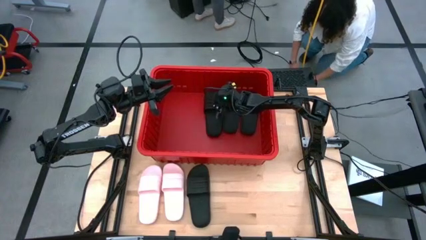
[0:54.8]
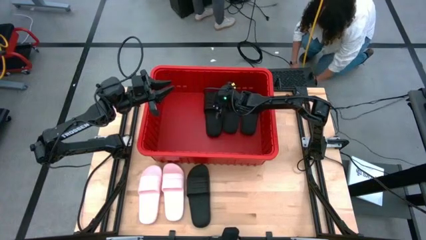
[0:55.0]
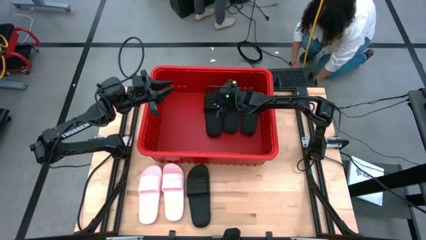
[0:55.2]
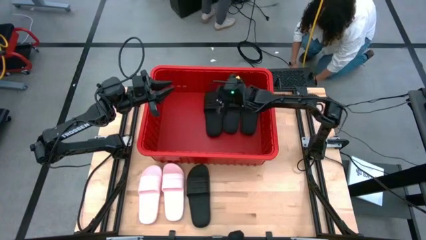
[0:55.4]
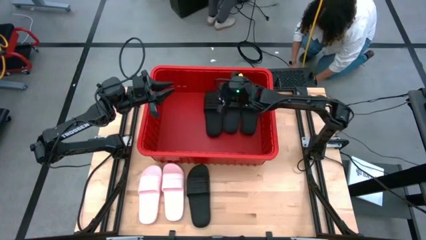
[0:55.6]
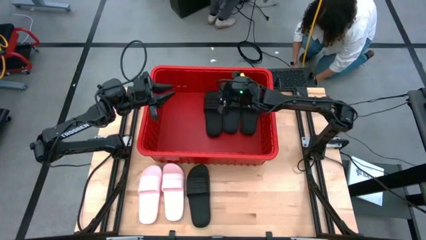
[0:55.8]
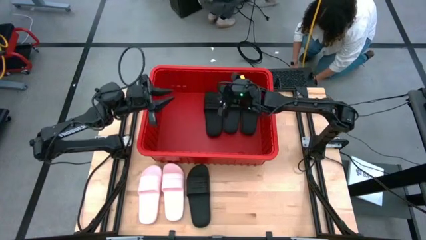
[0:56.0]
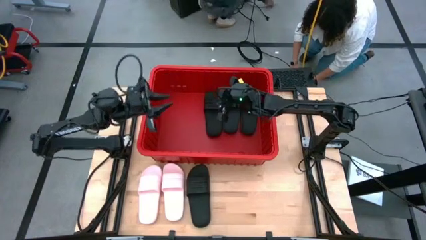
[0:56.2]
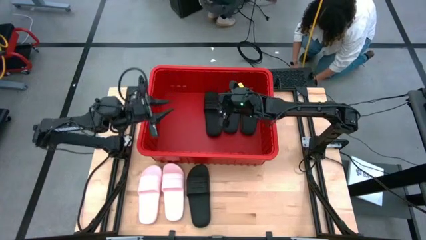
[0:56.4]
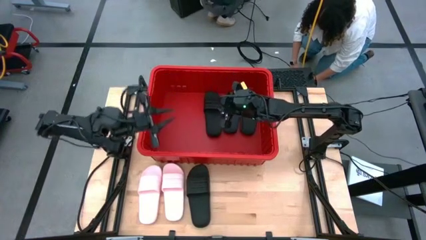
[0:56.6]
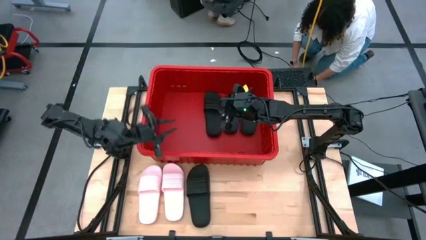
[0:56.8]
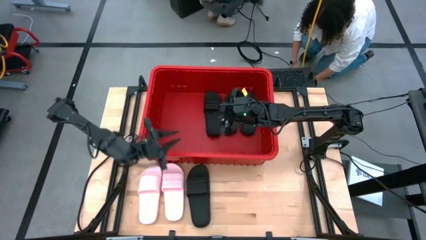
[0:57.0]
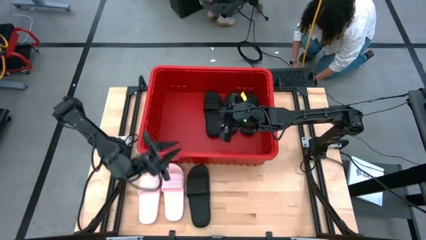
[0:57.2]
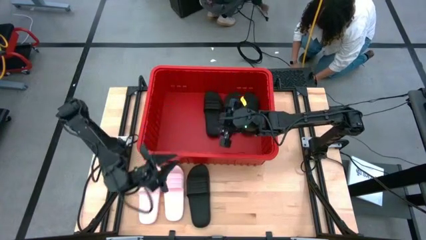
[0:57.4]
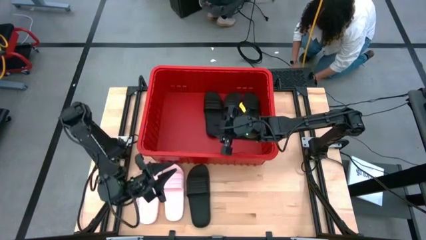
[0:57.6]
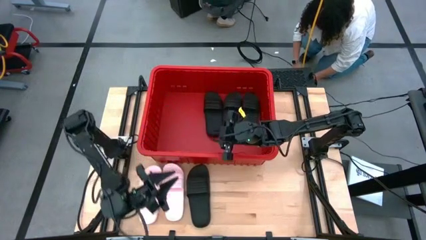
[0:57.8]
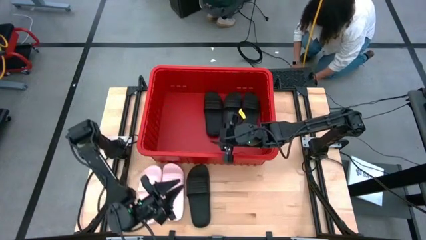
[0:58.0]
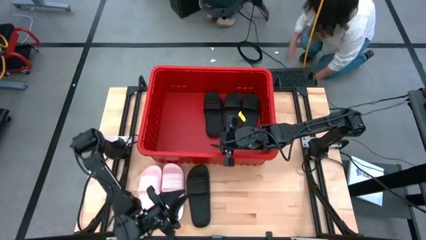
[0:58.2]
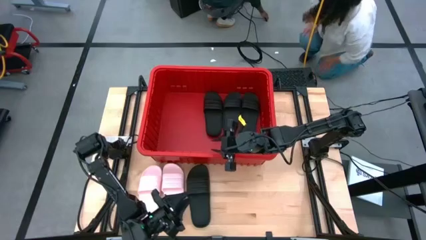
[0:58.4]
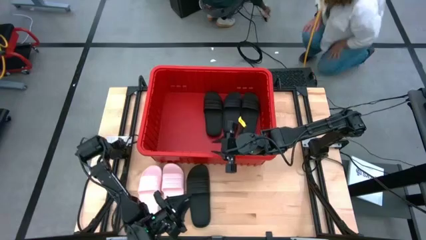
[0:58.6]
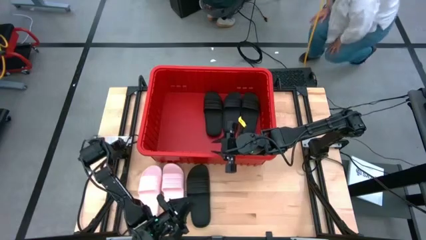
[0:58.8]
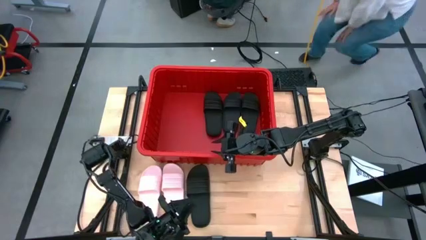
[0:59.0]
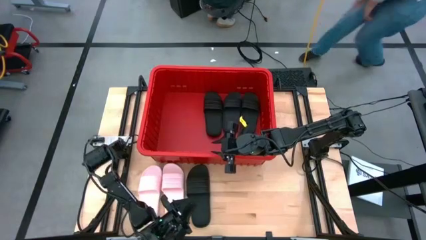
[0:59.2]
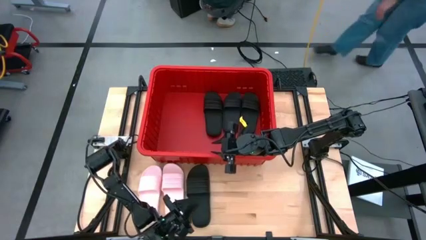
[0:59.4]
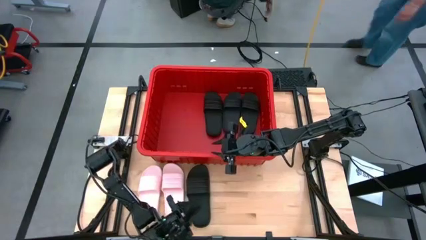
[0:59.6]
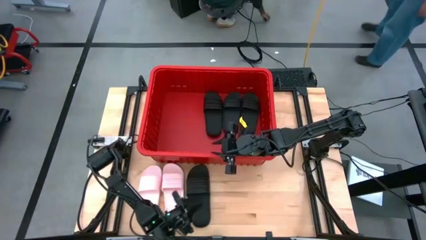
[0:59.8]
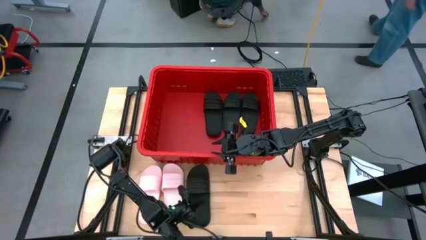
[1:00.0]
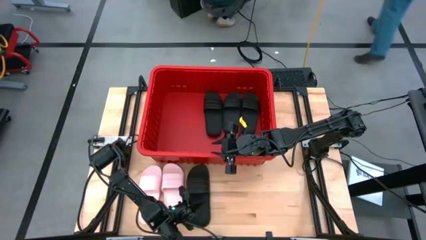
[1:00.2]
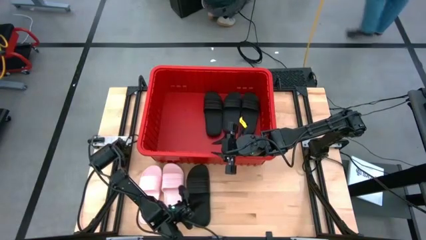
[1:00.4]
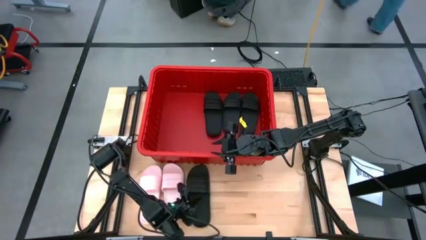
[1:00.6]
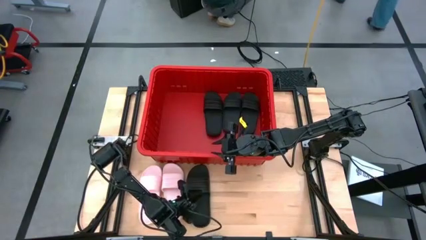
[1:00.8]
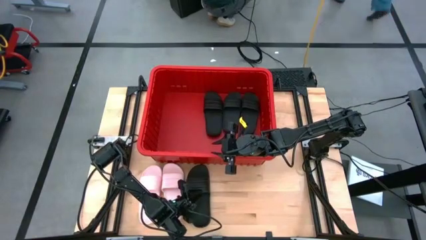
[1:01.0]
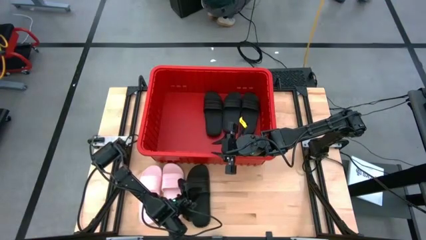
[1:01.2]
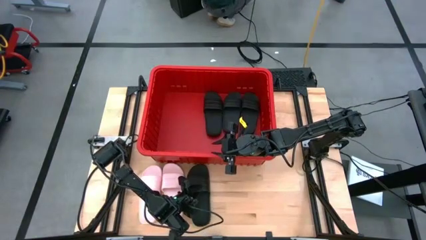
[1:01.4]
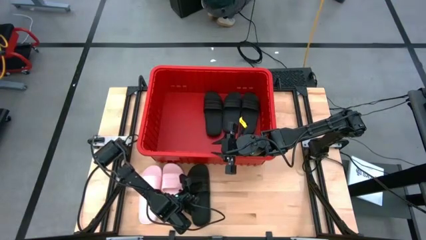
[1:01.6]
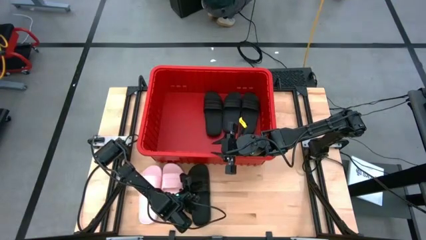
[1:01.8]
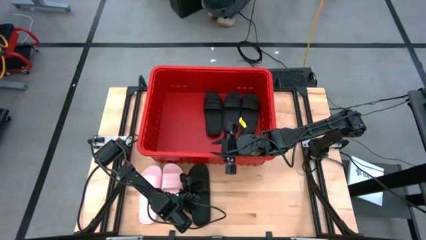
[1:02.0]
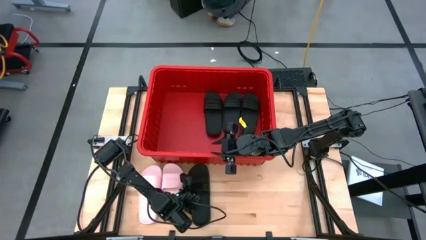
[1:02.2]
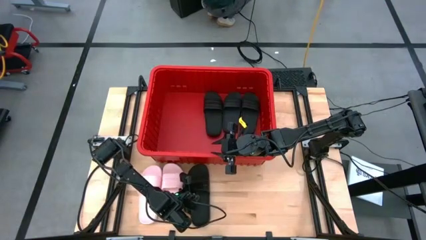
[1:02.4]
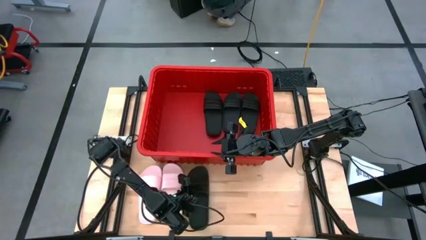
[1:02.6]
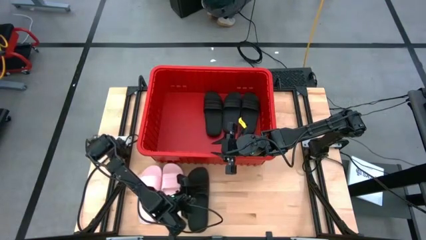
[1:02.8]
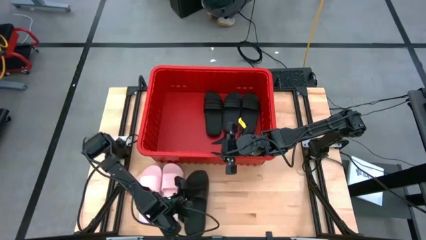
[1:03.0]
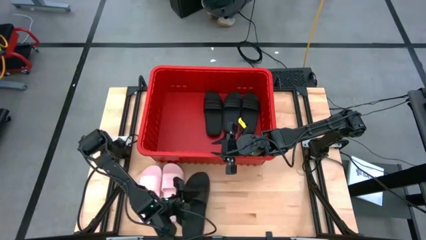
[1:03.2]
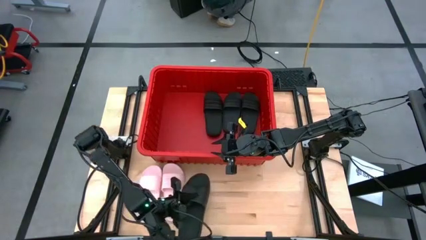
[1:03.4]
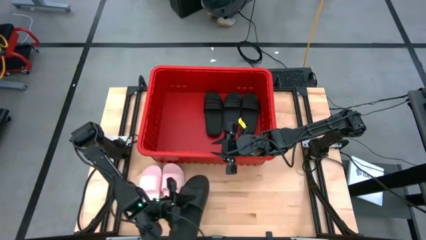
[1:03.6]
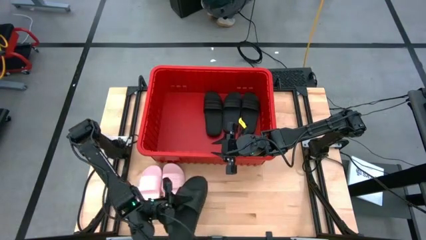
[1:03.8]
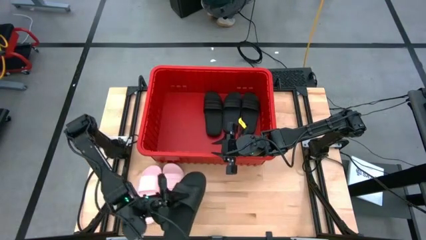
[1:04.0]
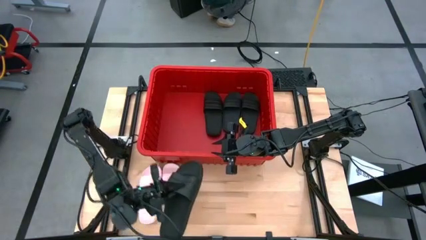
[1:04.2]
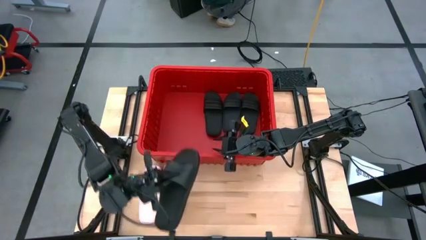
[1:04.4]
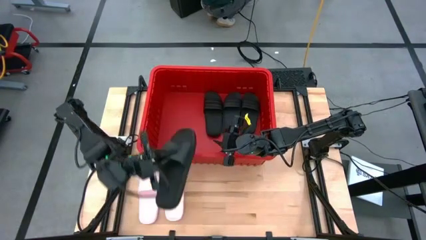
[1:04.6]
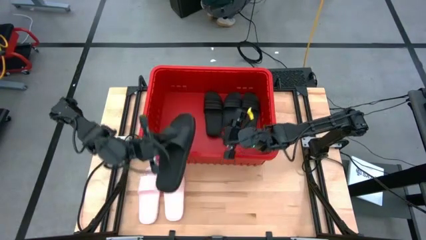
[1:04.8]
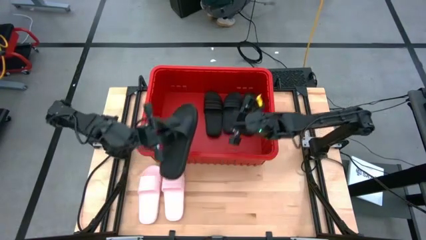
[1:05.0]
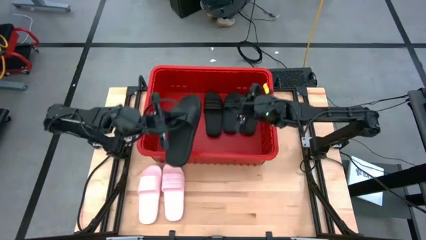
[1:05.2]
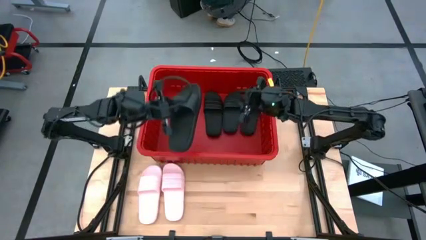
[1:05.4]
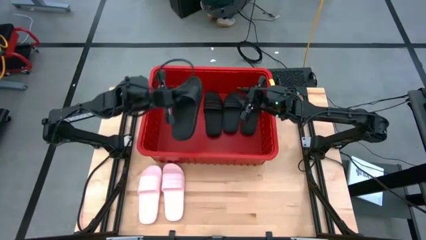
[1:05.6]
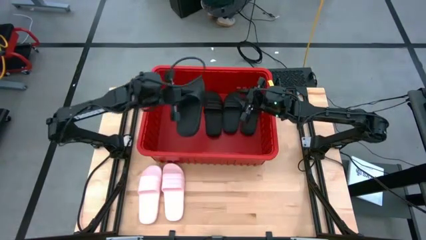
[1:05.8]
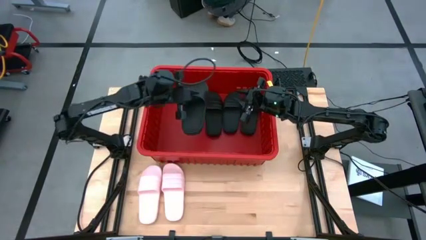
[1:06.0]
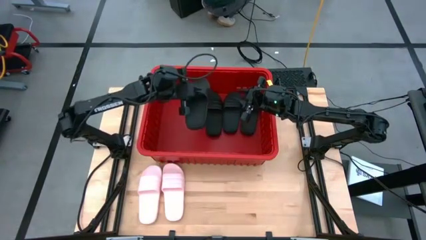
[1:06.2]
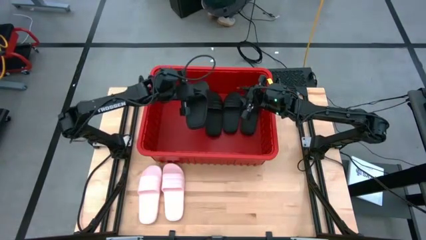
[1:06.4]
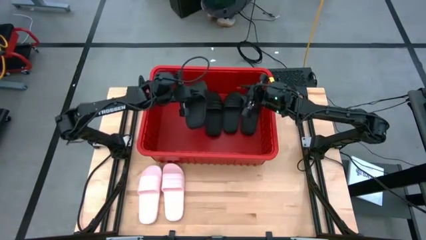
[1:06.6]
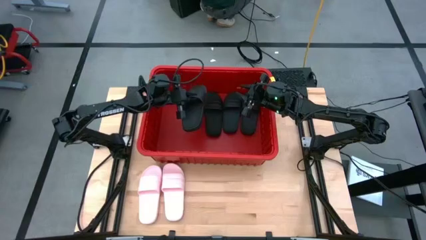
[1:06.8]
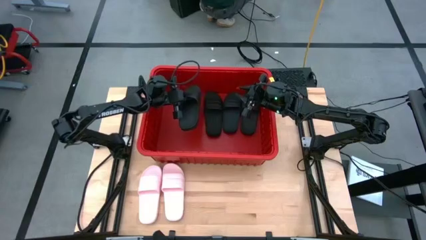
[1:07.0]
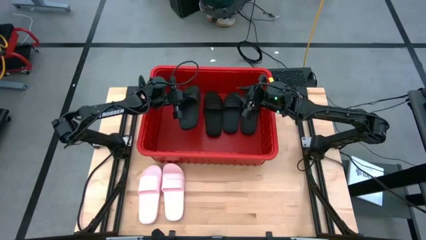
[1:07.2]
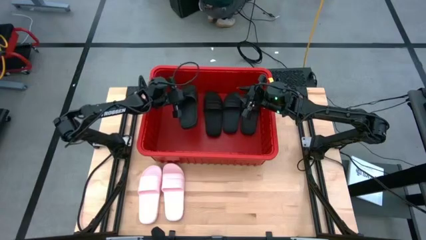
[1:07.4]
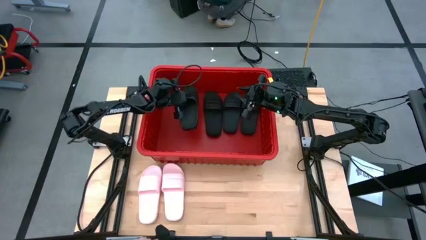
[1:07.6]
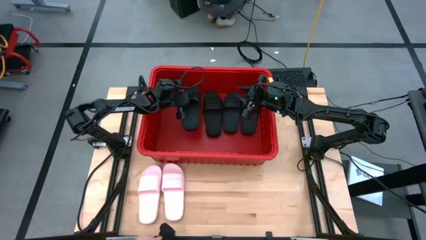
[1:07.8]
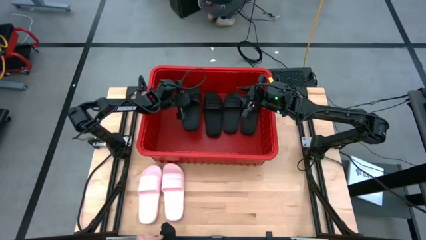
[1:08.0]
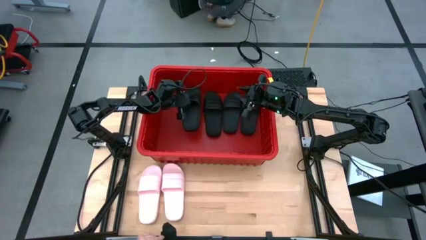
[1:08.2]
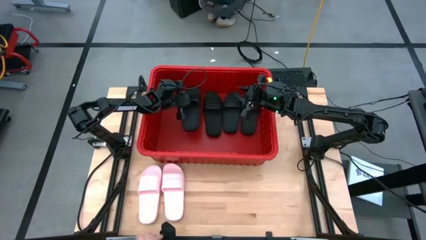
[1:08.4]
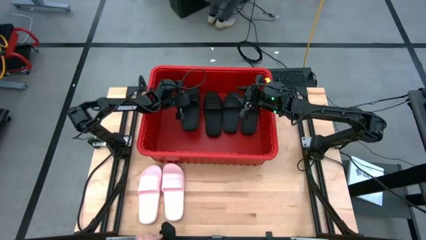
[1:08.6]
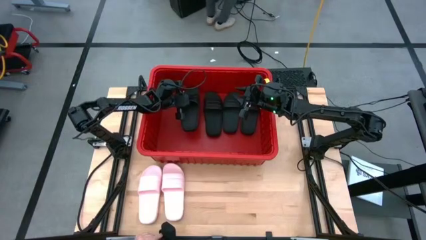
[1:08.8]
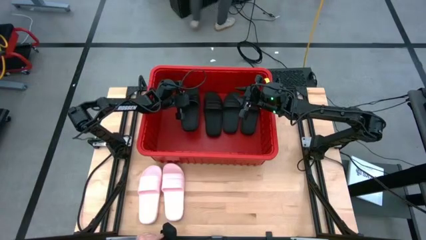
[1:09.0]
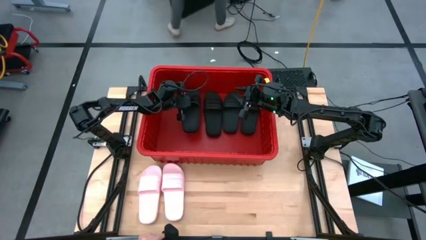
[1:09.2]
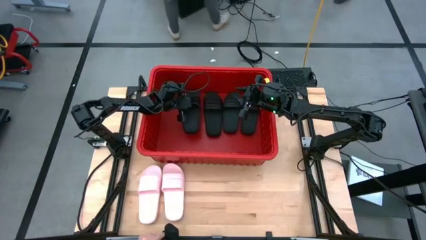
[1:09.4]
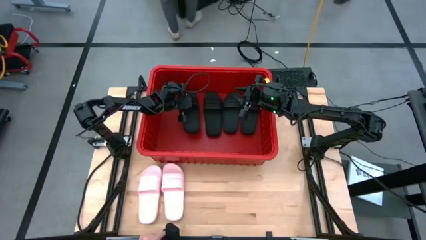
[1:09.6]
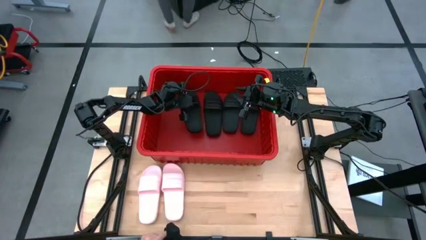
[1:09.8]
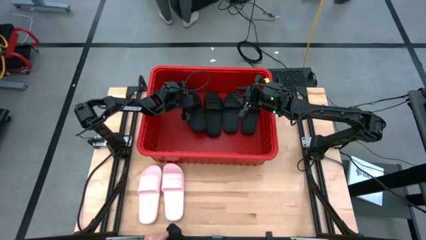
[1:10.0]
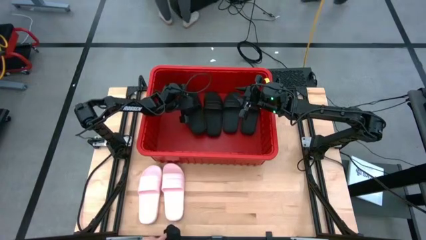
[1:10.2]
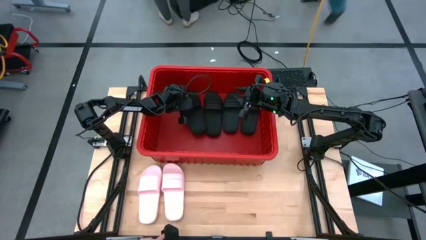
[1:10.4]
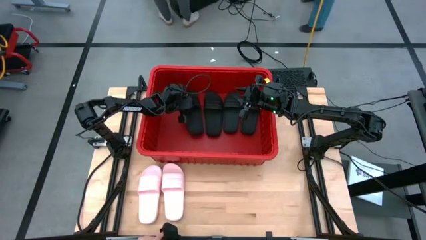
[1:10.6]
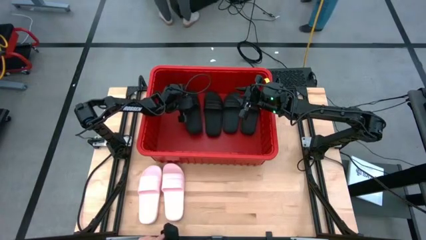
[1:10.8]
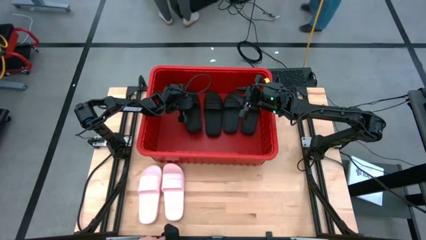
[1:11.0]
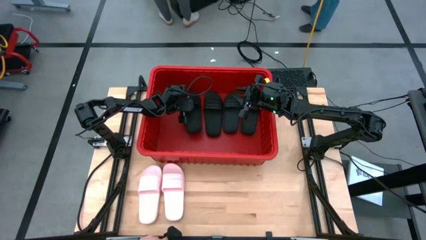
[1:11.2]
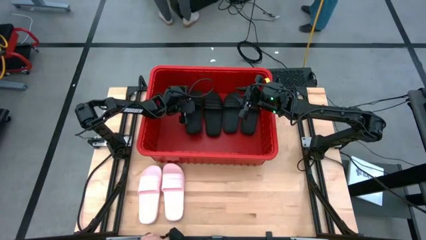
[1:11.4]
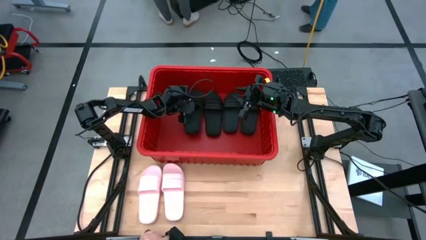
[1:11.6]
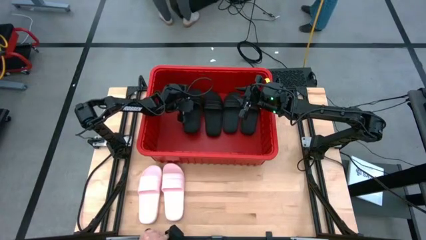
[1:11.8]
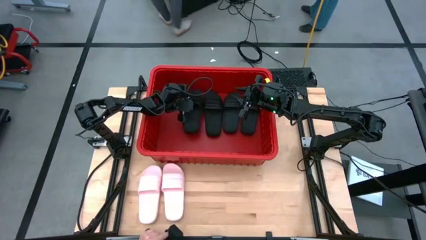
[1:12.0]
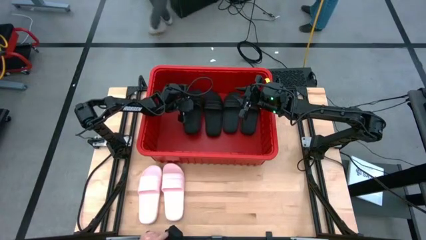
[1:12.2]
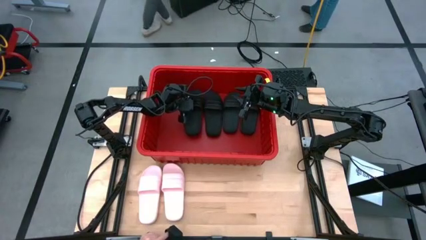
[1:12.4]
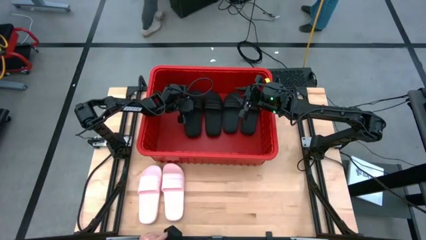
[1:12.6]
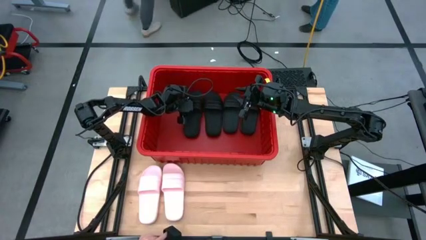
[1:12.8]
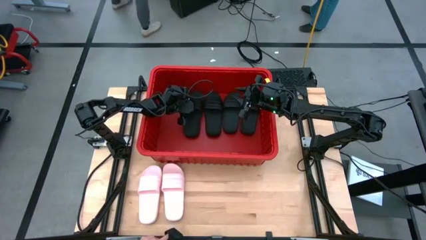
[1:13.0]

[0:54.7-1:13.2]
Task: Pick and place slides into bin
Put the black slide into the red bin
